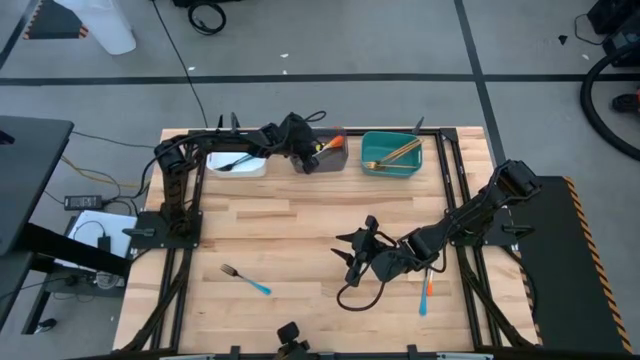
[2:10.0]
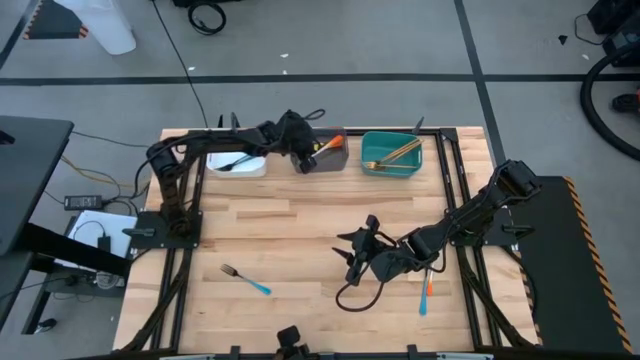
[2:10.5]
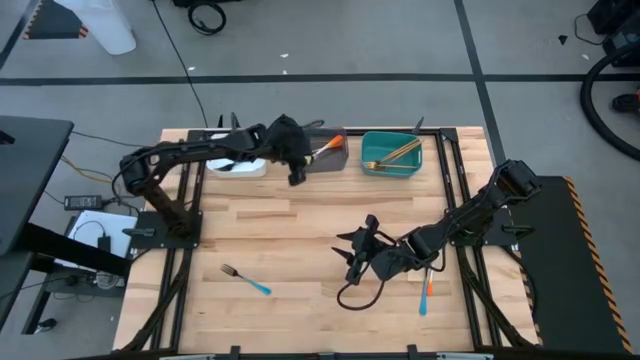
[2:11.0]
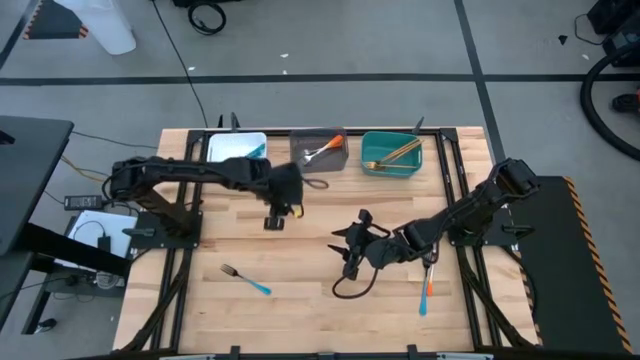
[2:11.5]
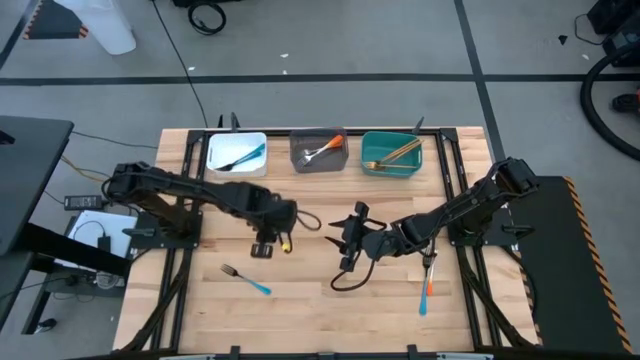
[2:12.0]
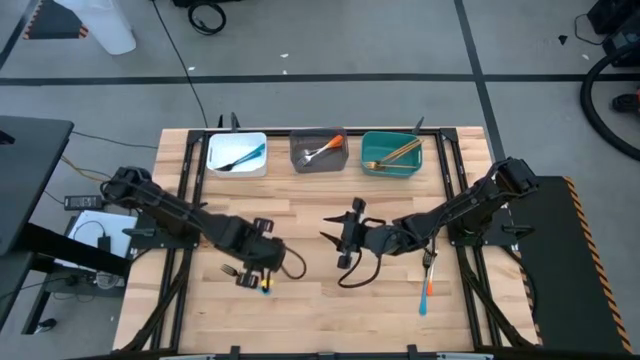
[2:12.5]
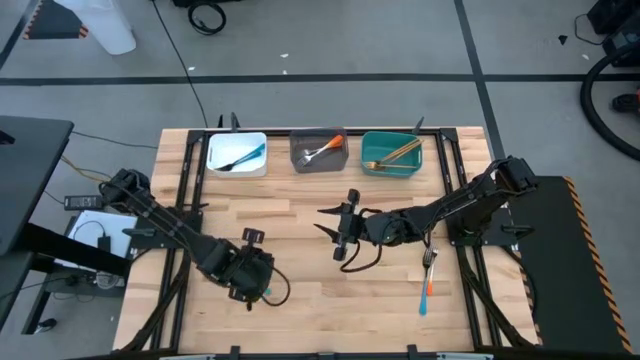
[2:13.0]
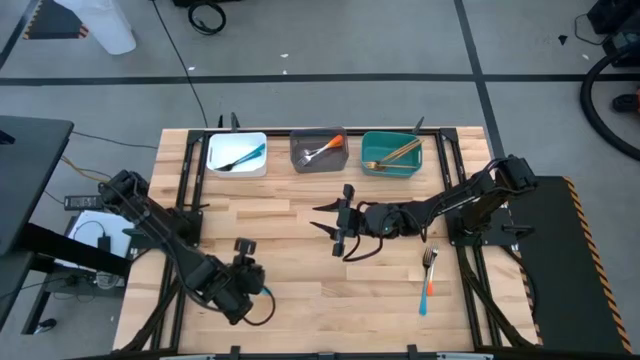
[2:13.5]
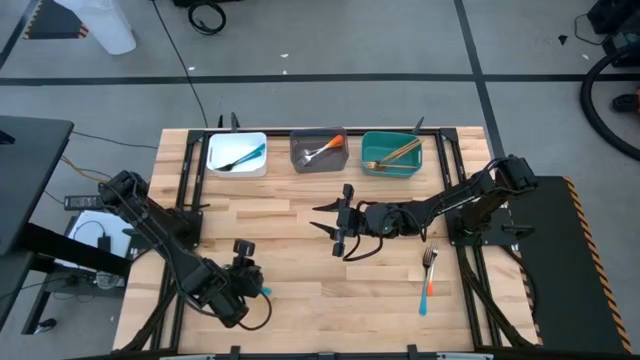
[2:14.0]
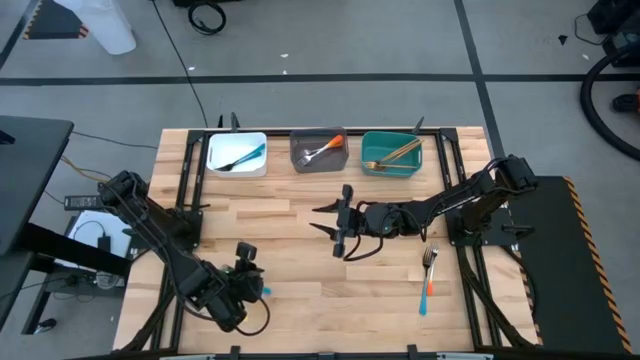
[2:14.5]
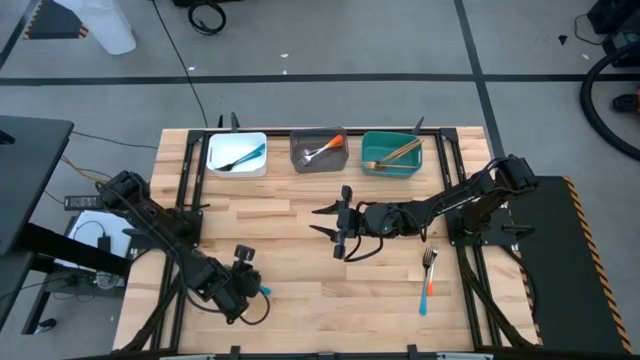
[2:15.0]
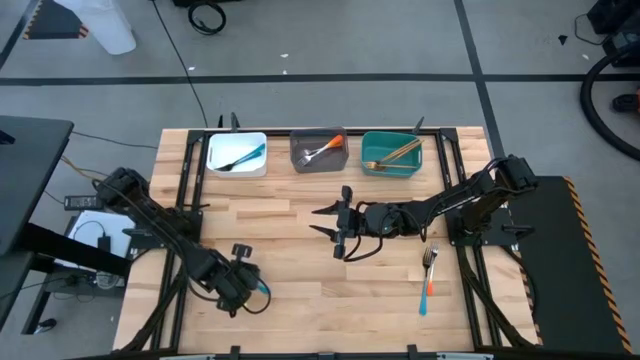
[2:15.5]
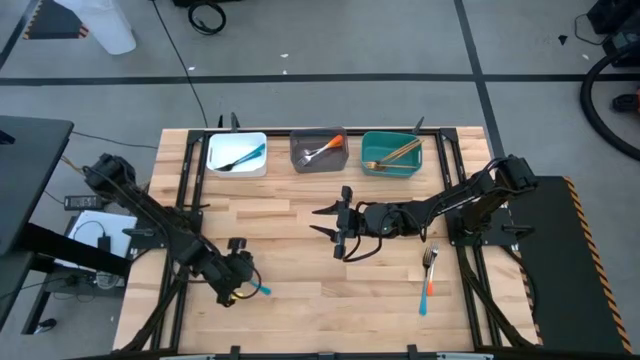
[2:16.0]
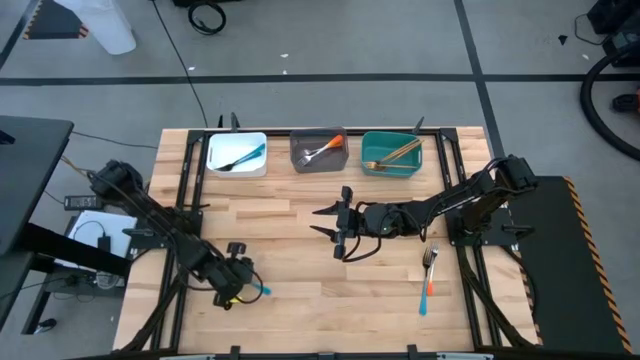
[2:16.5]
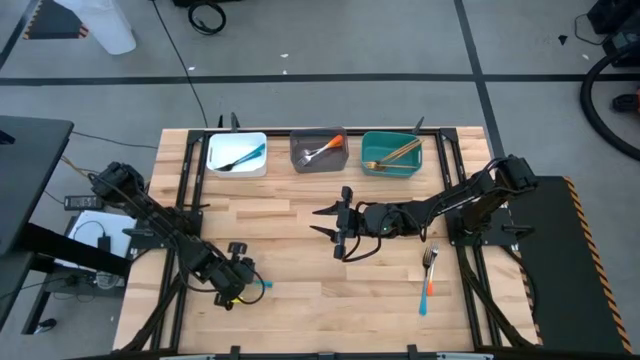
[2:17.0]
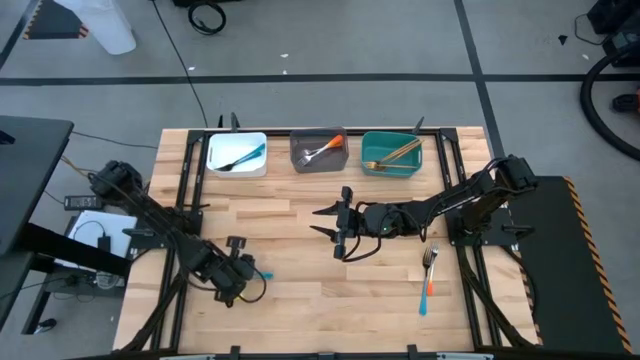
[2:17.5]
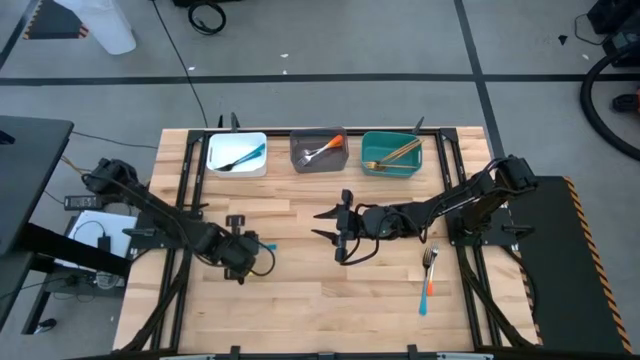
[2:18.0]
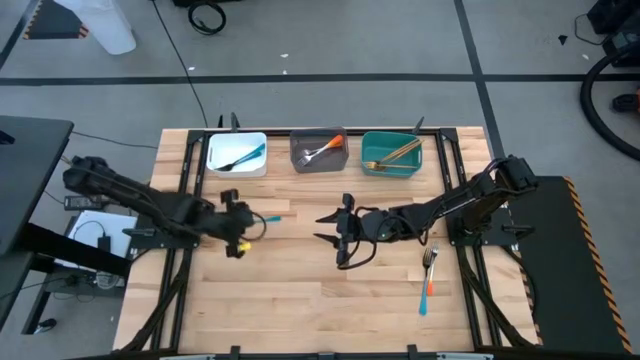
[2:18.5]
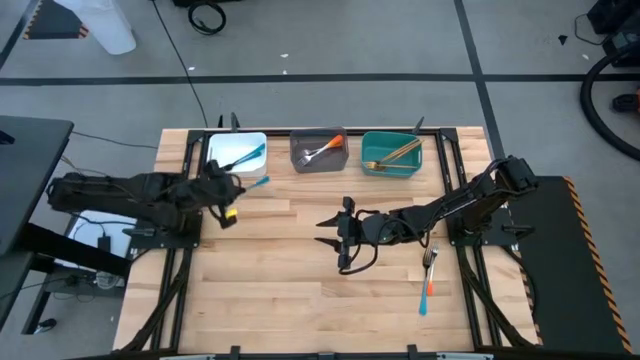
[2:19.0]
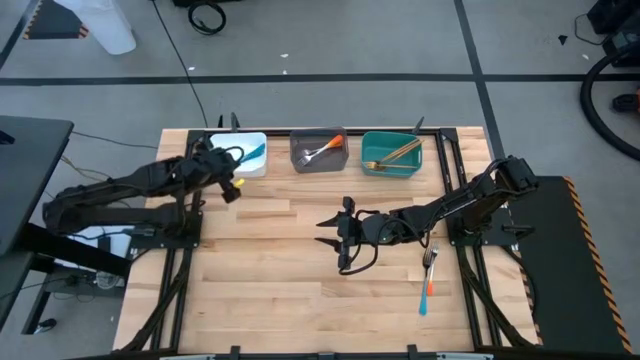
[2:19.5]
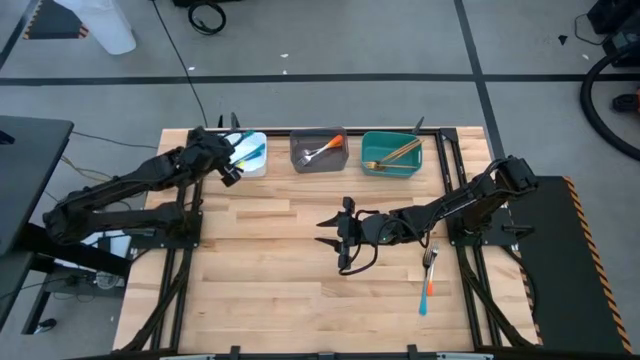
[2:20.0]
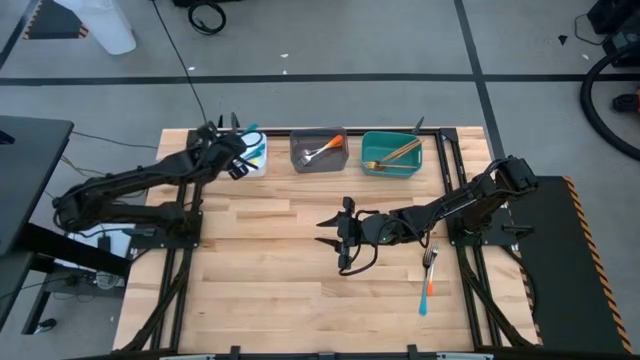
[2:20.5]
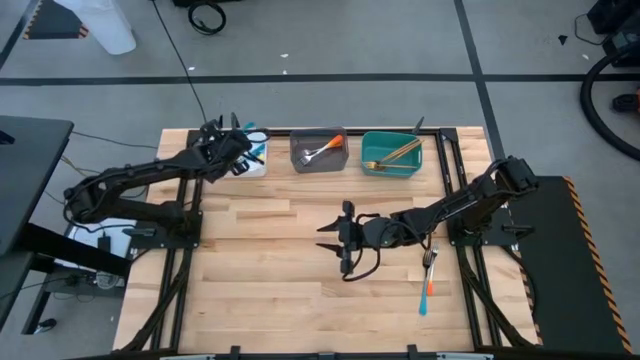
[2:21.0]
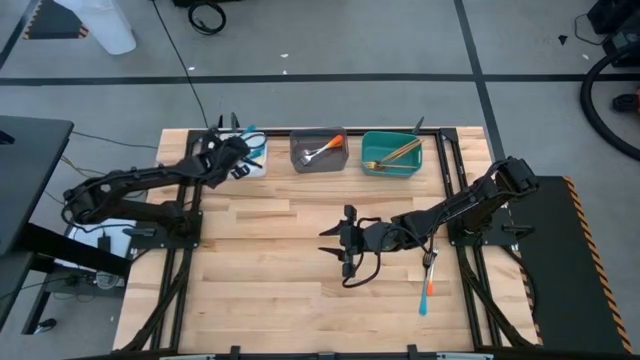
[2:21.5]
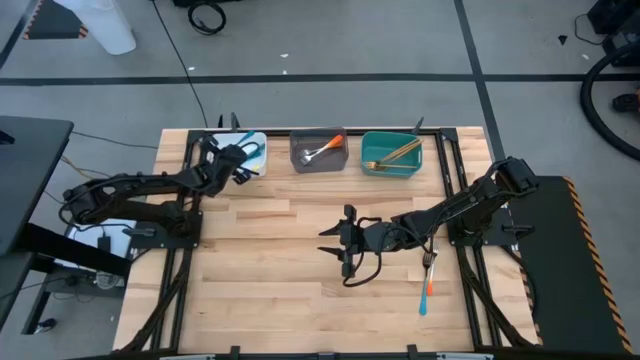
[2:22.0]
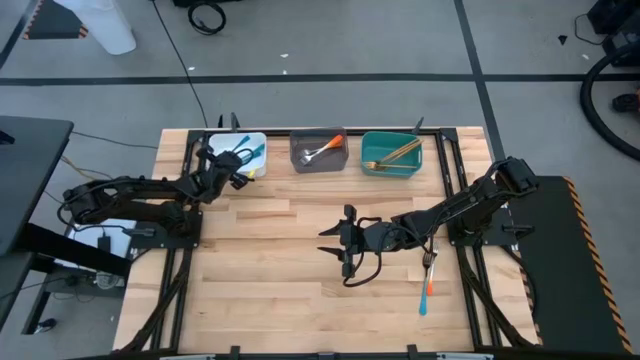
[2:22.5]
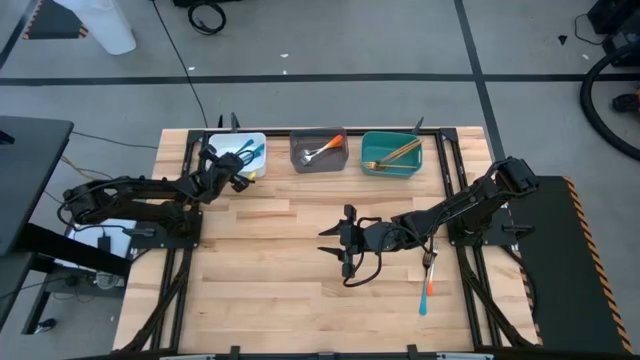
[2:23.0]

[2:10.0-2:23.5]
Task: Sort silverware by color (type)
Put the blue fork into the white bin

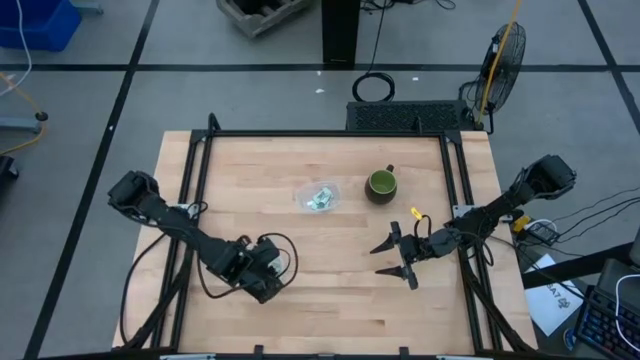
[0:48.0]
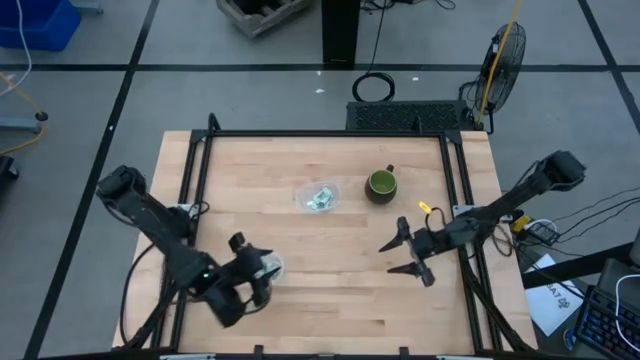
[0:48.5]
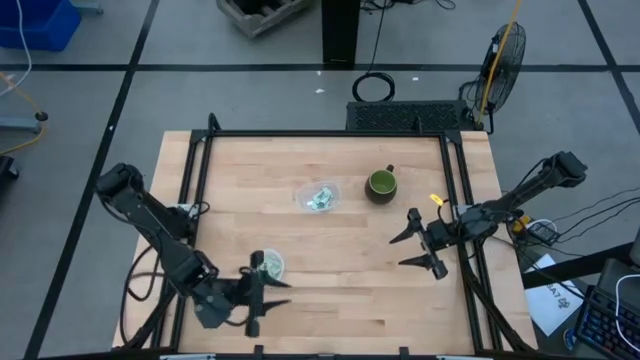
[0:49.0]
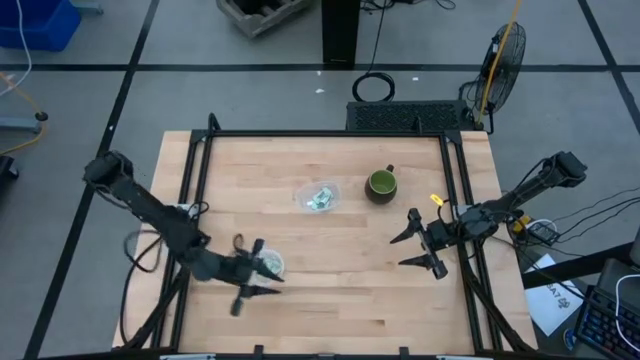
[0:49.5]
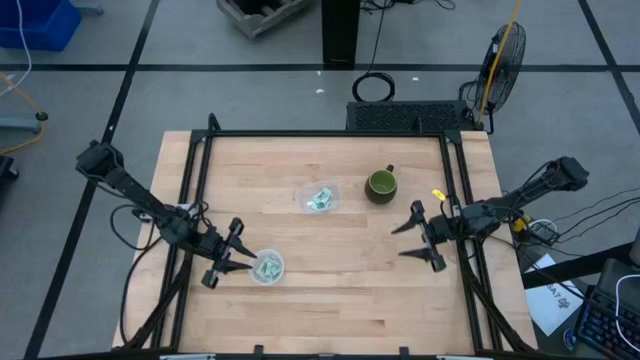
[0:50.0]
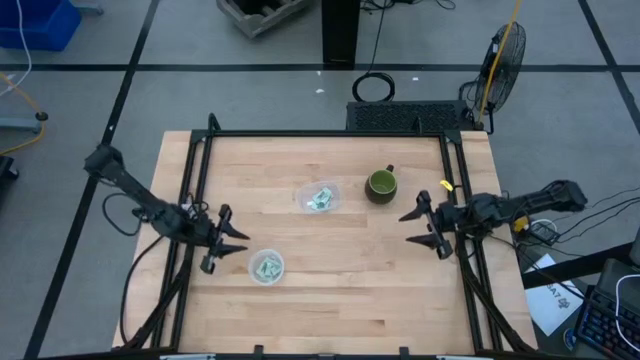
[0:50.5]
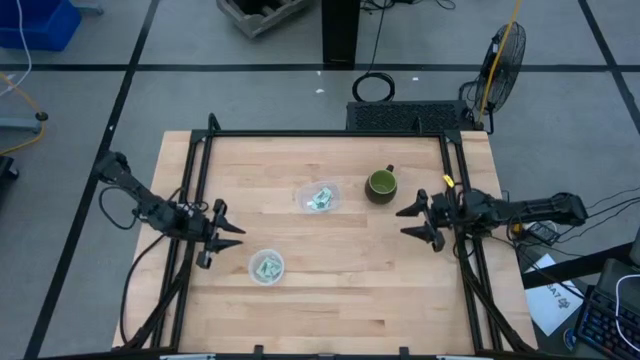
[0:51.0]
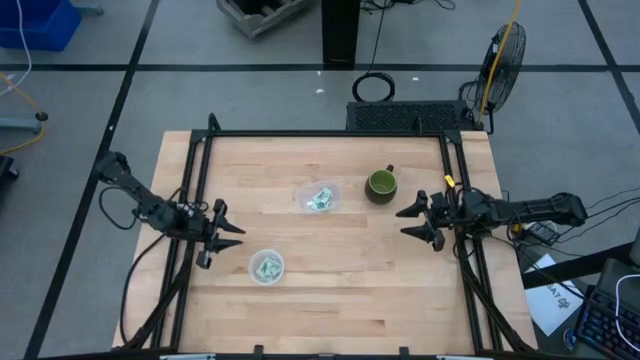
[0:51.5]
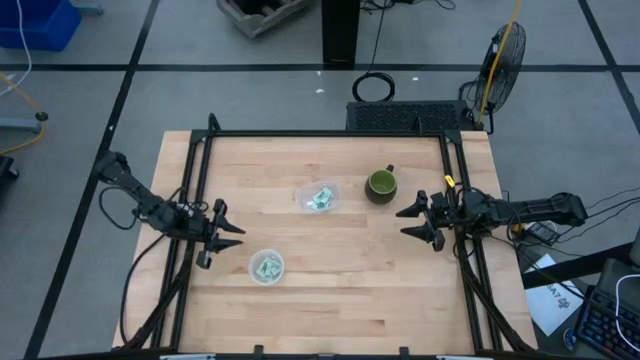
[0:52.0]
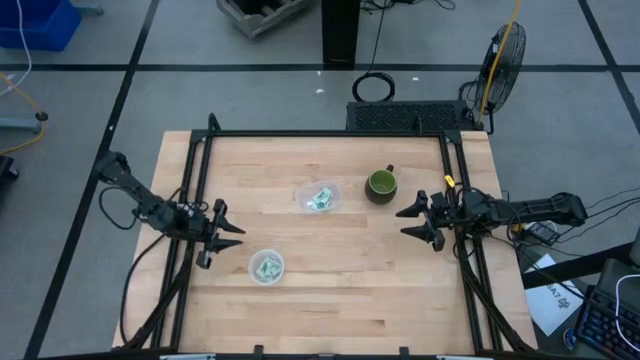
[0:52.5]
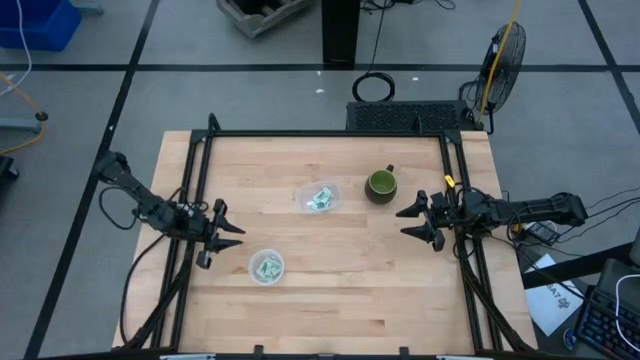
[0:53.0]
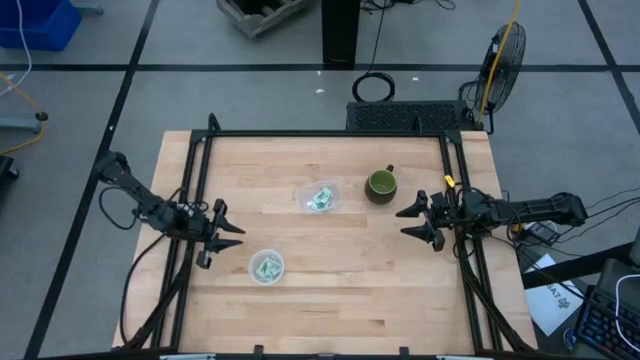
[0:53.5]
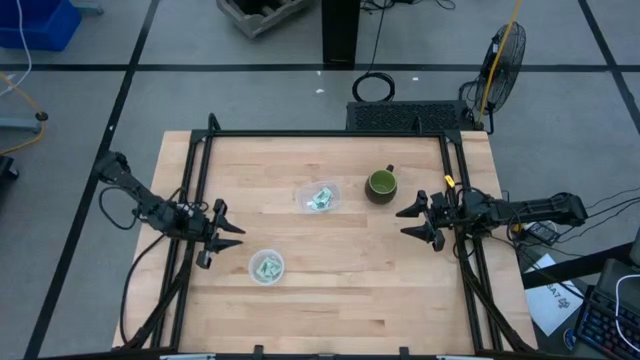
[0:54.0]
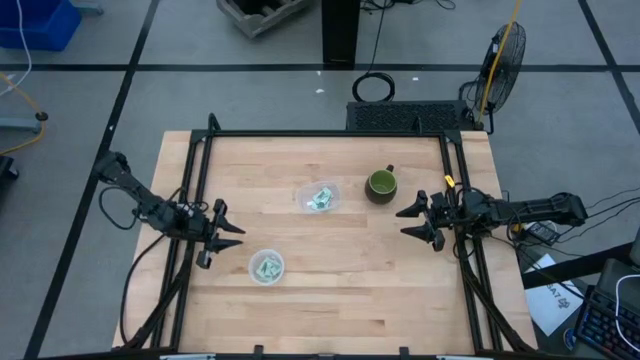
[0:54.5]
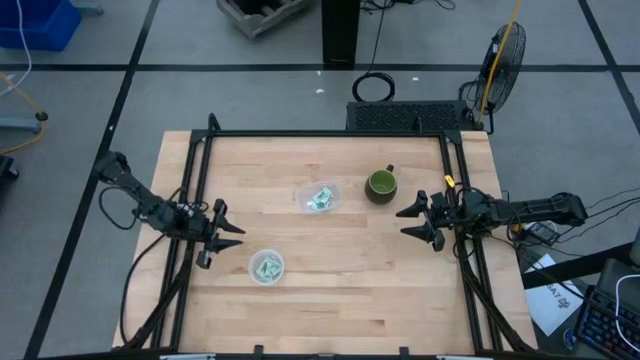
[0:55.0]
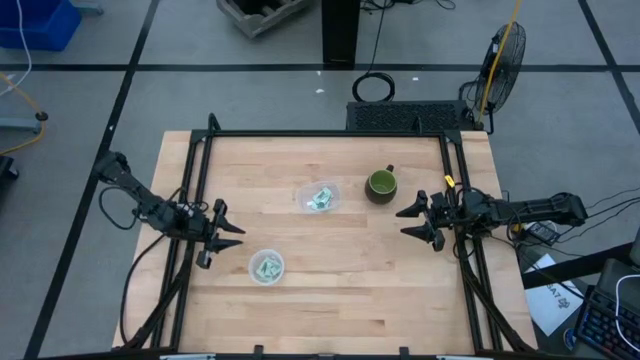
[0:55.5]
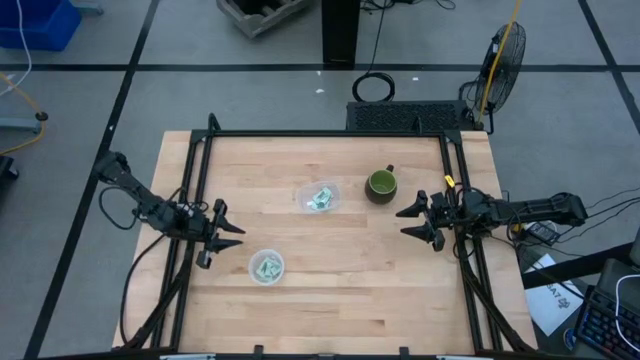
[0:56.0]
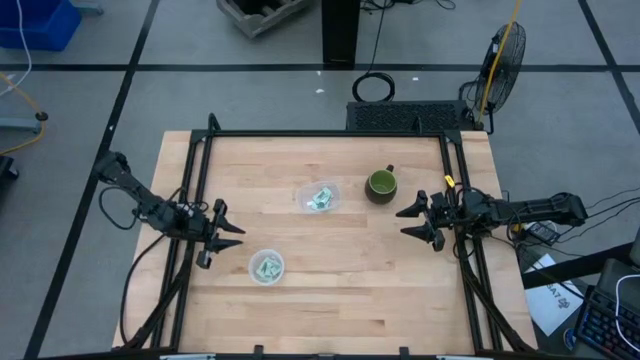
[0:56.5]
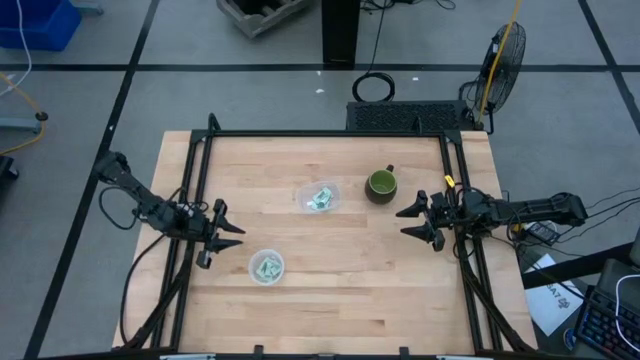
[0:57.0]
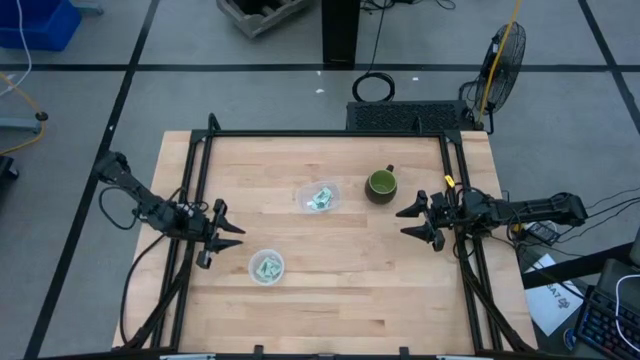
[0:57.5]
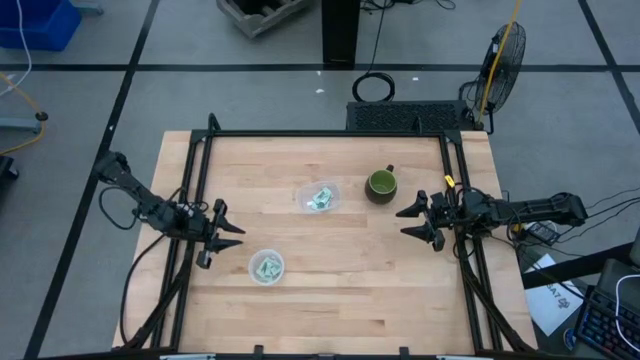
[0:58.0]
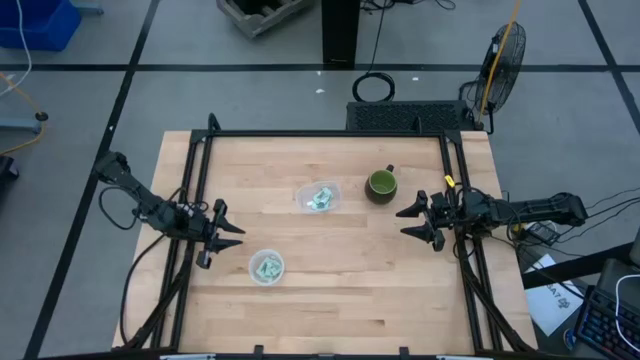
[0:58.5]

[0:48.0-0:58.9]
Task: Pick and place Stevia / Truvia into bins
Return to Home Position
